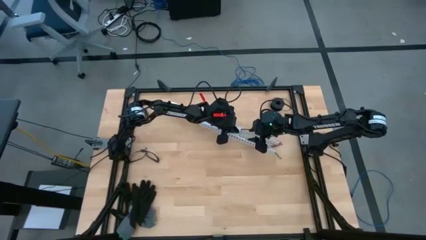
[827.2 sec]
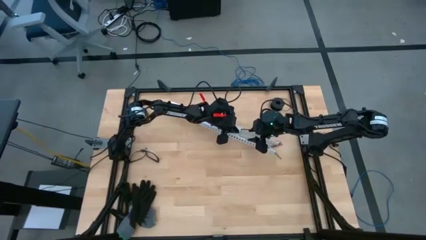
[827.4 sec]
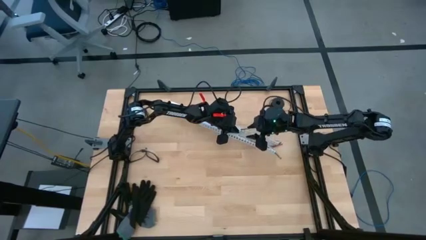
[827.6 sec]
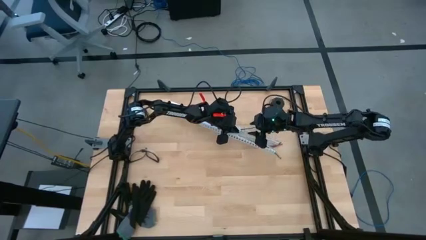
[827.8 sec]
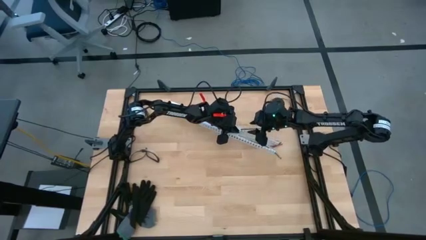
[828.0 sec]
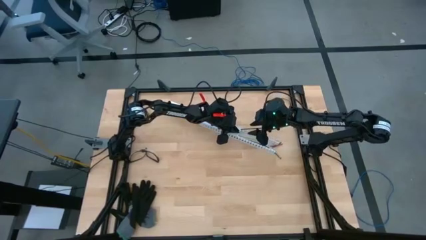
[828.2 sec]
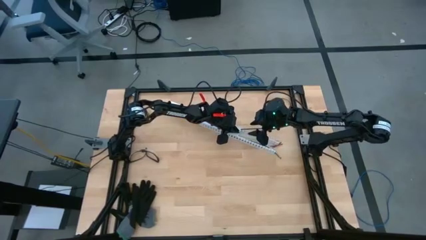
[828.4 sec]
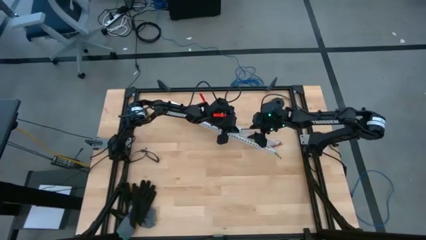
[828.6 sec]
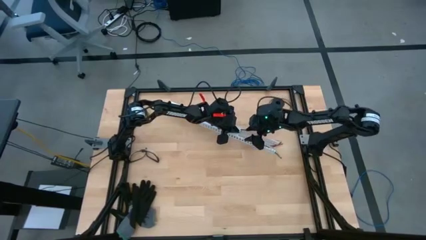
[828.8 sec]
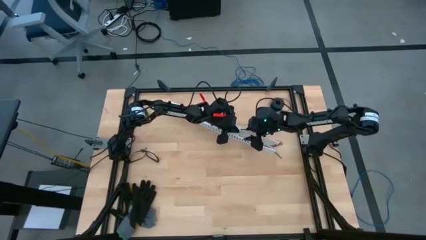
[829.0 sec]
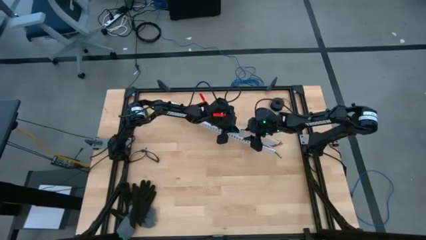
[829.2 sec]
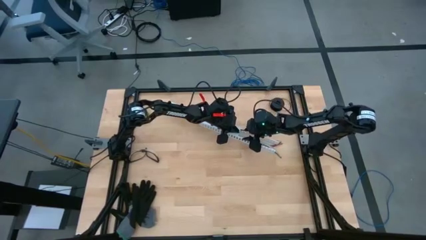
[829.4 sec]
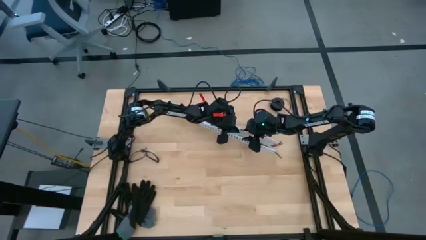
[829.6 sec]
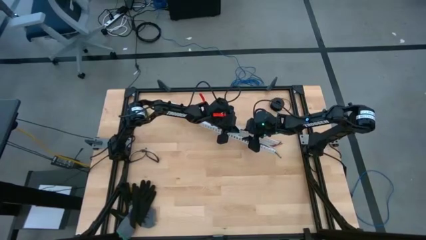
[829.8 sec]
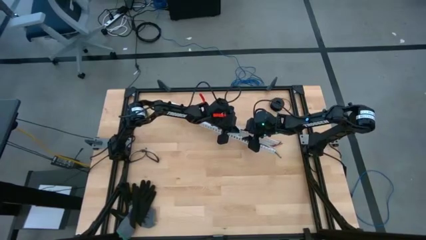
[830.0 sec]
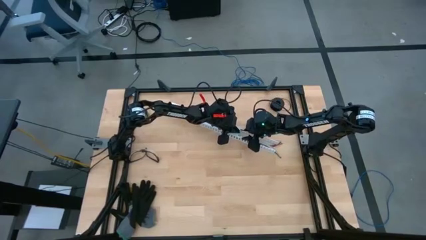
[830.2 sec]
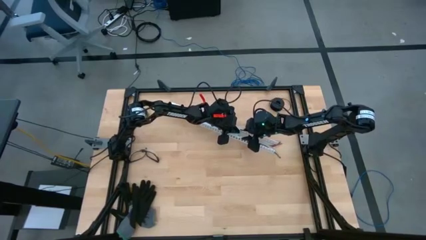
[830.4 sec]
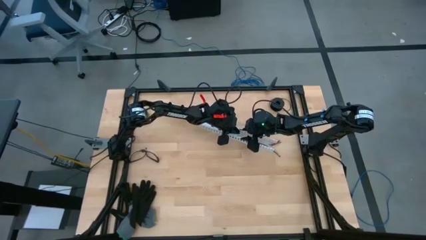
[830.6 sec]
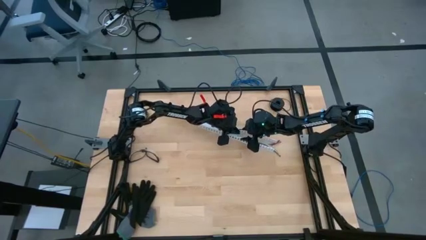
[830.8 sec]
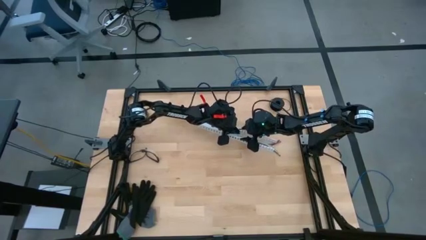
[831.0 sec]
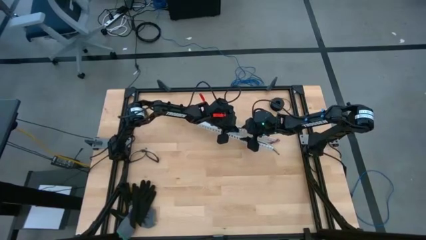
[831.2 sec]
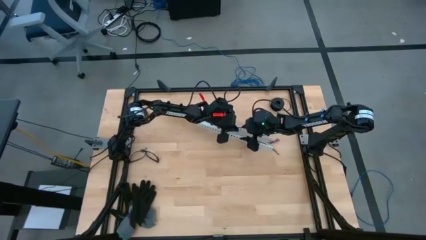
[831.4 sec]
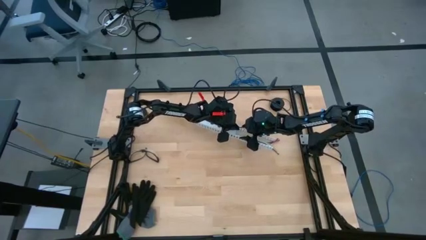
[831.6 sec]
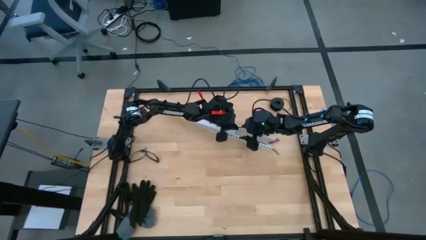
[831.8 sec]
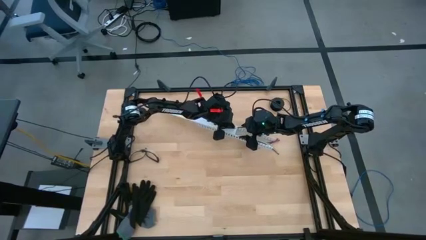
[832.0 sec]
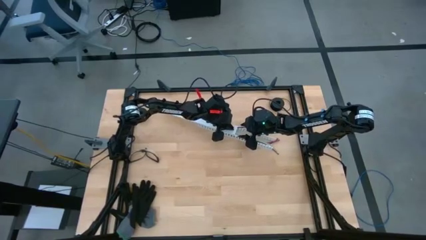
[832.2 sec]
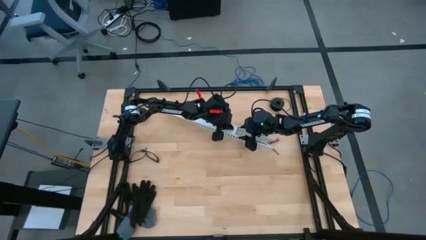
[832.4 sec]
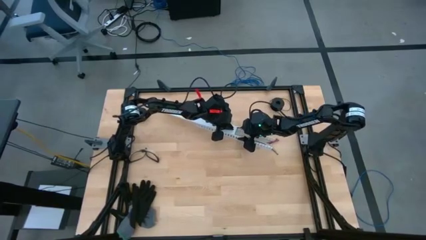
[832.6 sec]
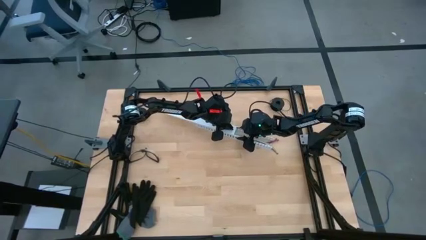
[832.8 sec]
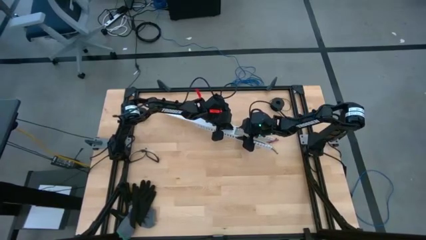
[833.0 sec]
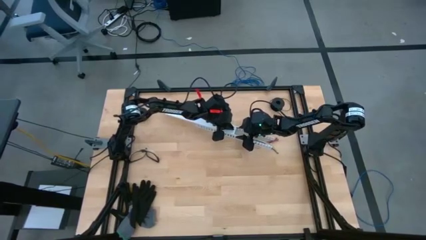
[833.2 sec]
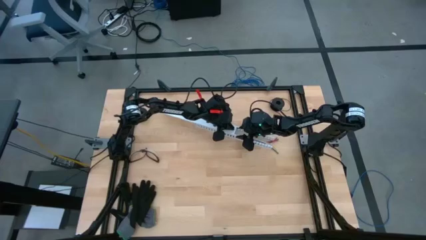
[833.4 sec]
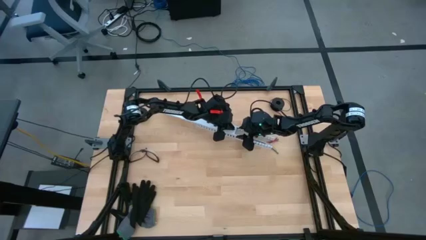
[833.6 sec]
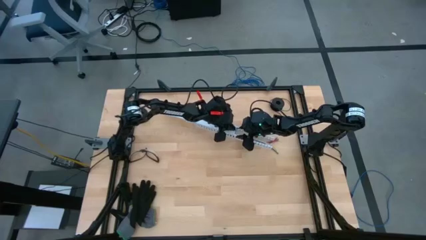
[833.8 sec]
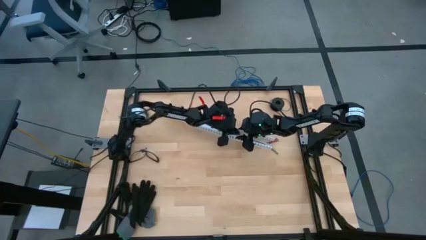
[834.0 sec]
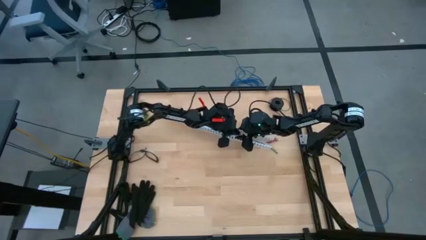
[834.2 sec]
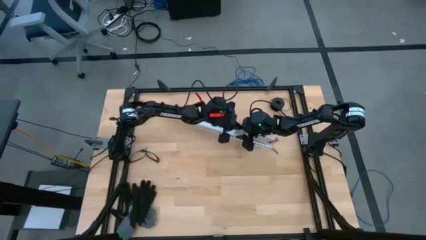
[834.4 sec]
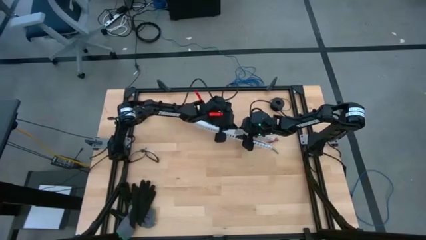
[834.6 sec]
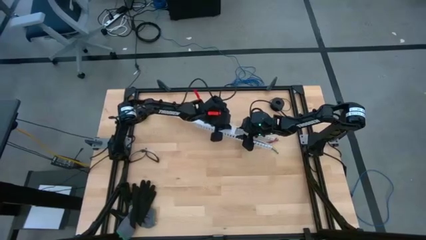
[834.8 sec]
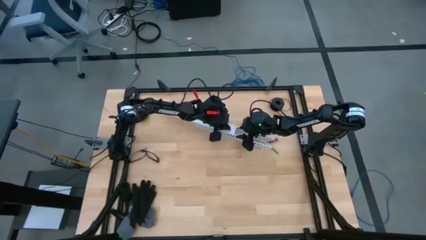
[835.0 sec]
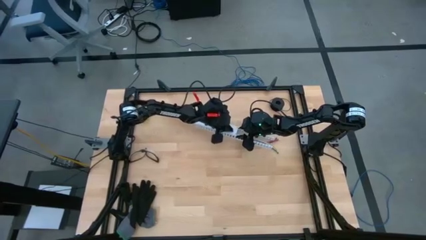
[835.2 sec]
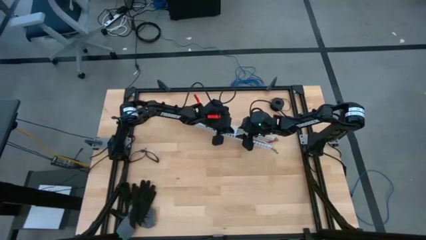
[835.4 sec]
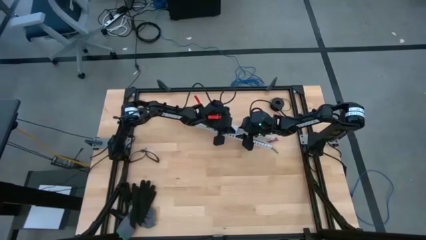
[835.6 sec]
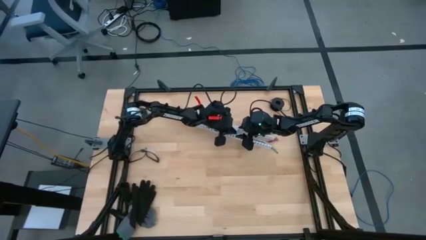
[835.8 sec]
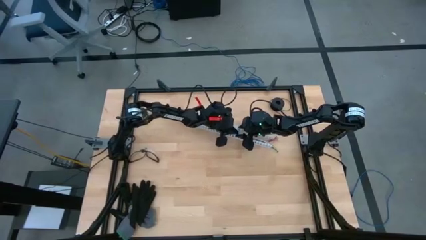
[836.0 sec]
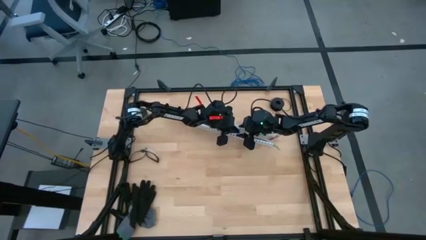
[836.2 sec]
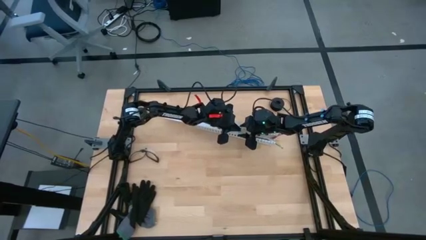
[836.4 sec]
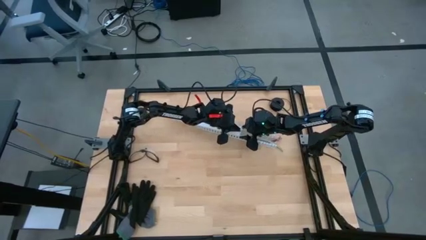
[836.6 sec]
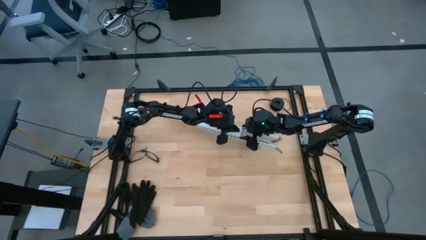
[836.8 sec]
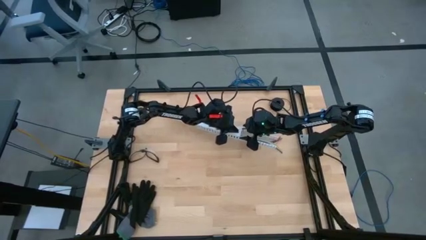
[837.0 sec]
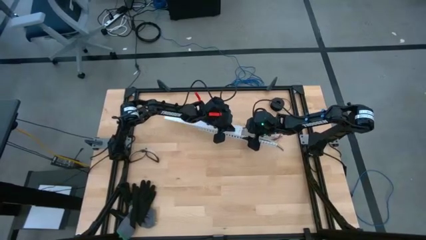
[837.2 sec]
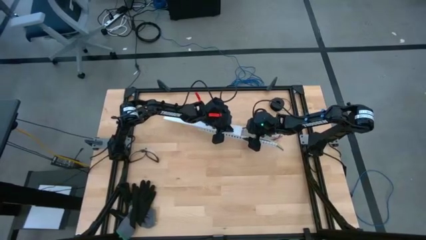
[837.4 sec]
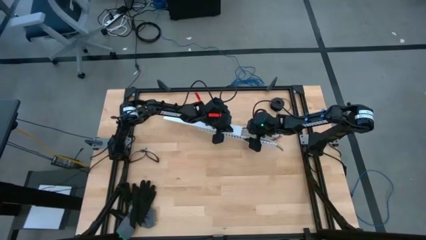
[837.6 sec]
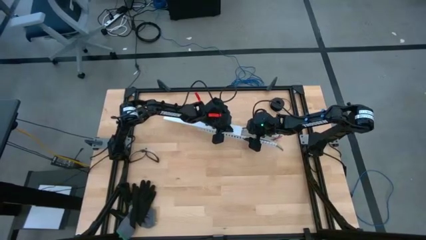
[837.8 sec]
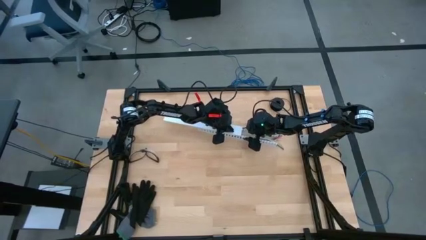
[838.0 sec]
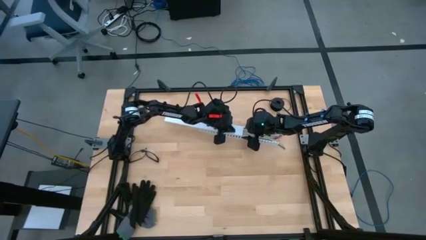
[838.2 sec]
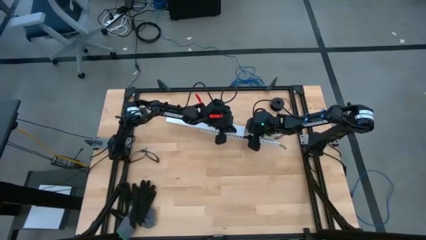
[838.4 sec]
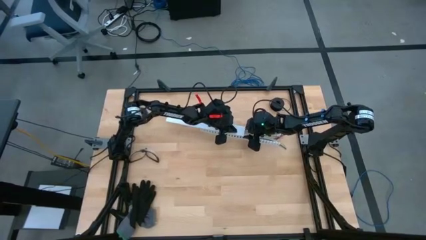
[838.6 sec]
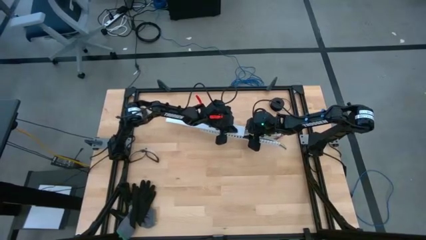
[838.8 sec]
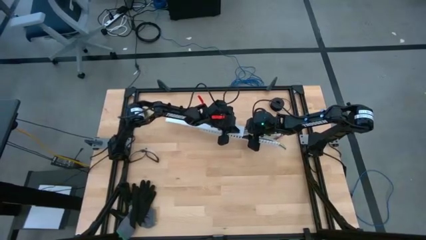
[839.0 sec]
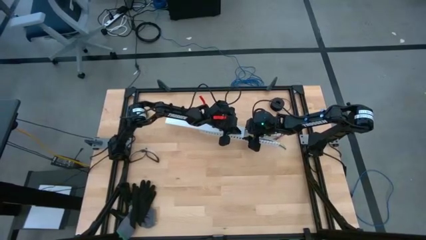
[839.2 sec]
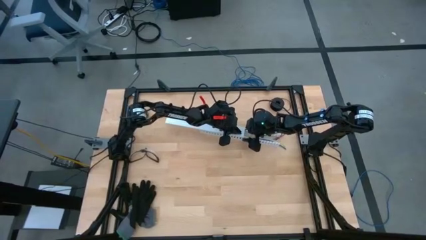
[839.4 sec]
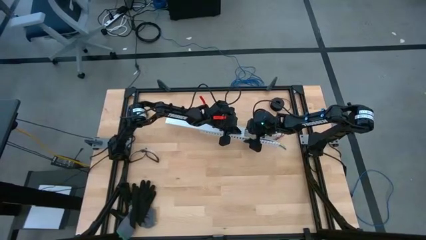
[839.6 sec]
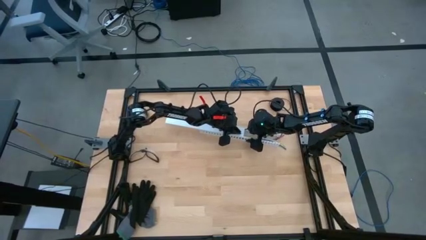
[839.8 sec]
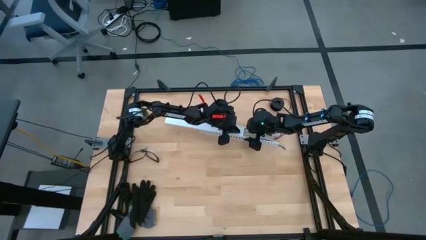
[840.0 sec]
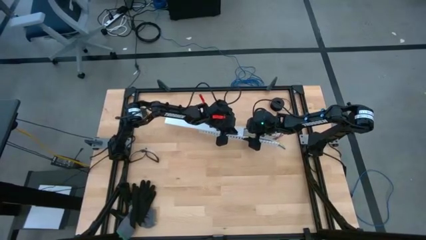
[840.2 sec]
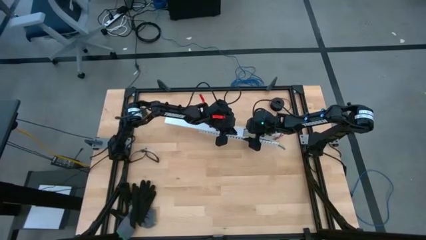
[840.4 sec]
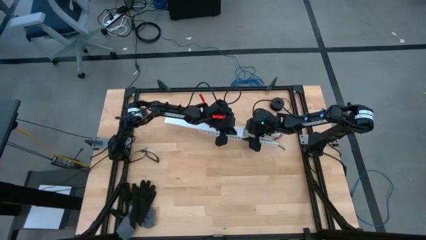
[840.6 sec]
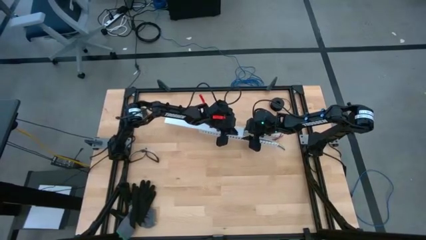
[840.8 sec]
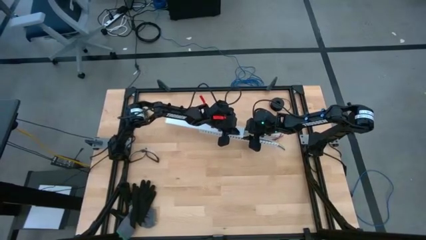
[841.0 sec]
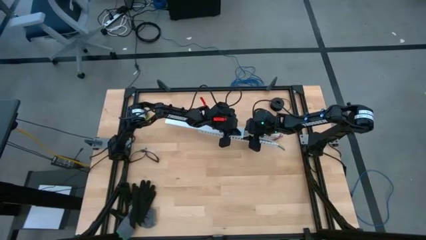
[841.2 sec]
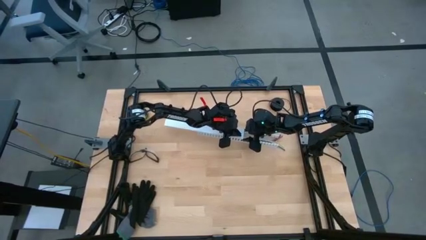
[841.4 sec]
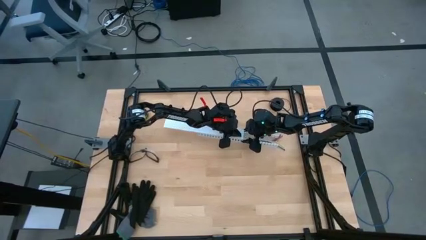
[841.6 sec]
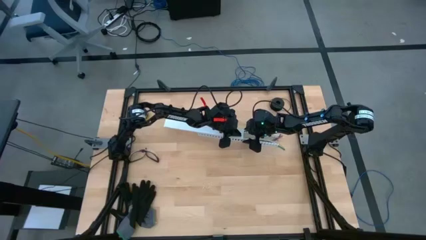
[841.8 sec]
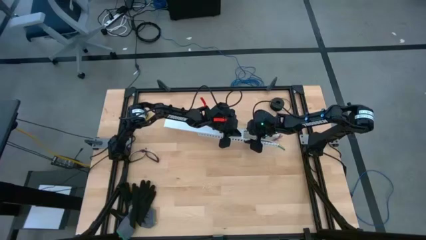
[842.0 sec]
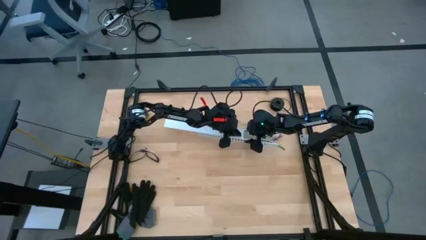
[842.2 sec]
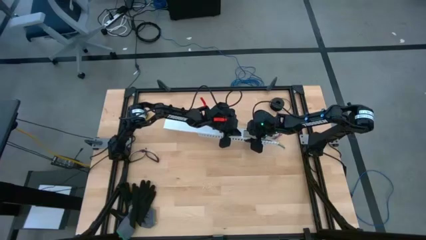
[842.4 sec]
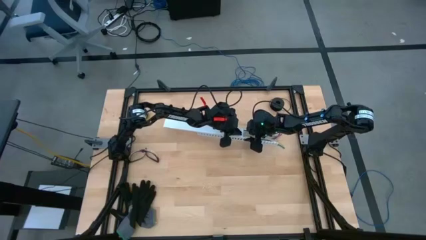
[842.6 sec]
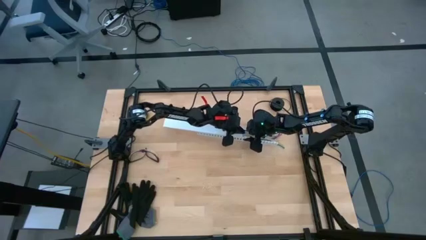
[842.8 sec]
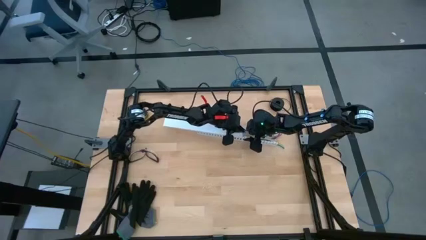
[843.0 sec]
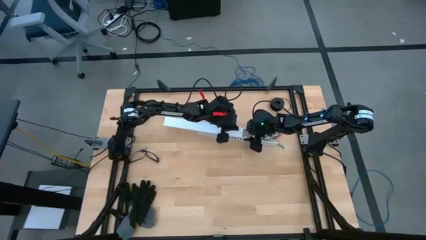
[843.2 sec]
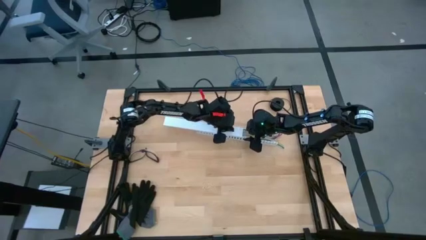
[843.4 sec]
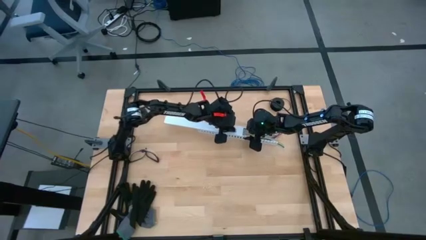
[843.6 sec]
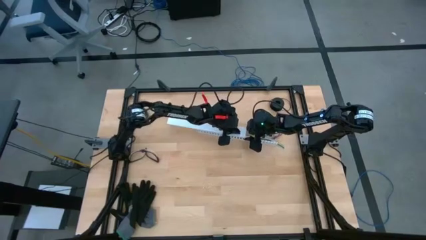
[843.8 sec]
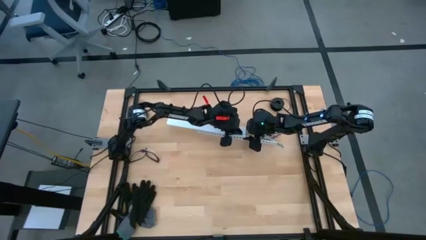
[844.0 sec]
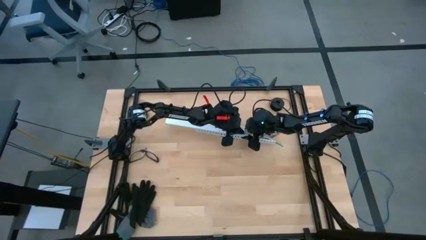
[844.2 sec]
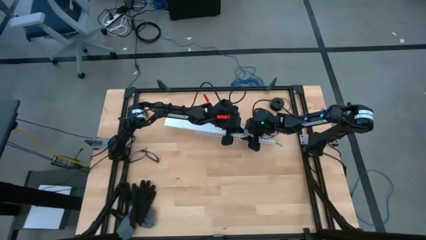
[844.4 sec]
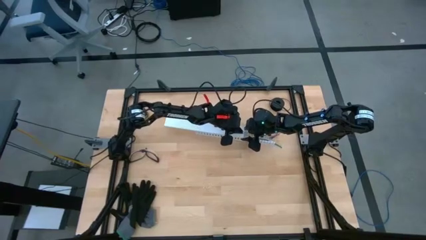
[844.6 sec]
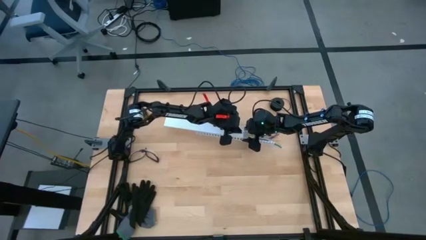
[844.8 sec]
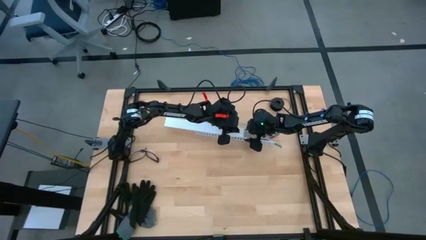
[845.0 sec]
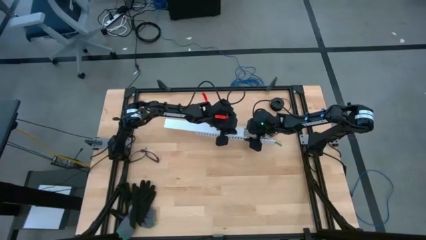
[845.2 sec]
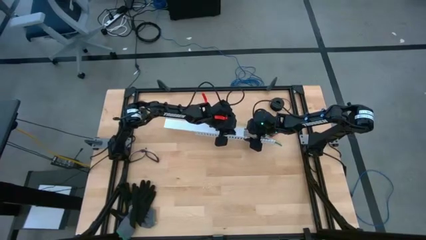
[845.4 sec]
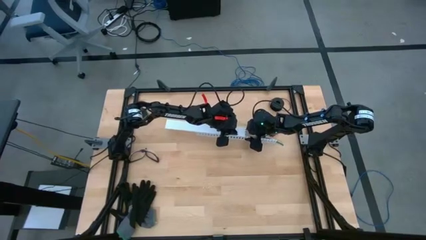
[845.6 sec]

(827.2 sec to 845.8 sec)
Task: Ziptie cables
Close the white cable duct
